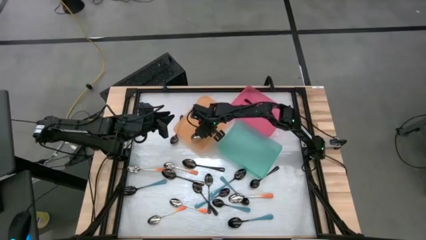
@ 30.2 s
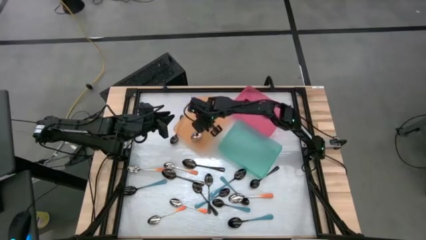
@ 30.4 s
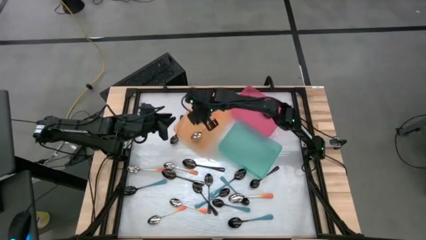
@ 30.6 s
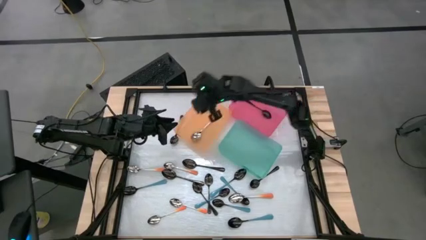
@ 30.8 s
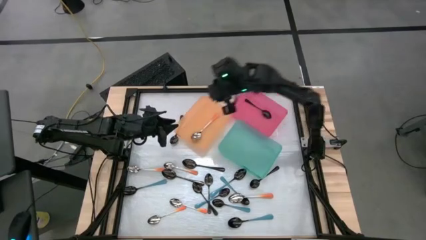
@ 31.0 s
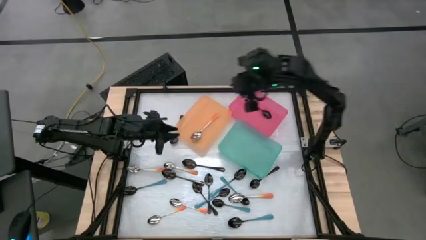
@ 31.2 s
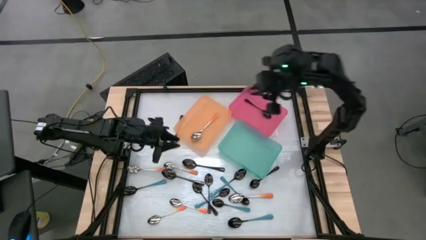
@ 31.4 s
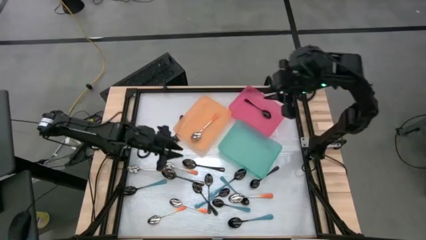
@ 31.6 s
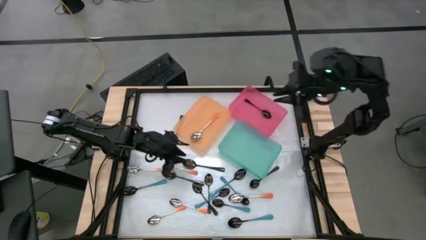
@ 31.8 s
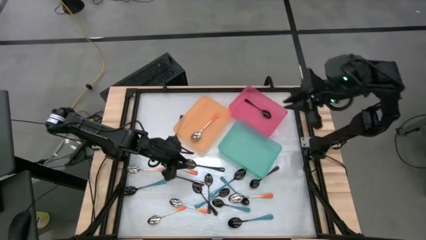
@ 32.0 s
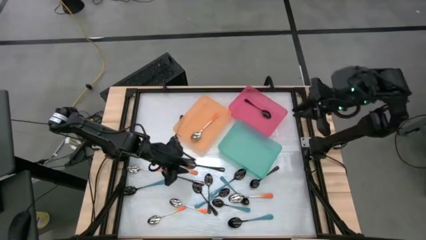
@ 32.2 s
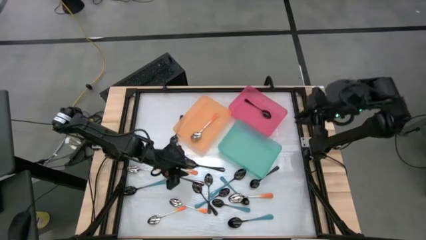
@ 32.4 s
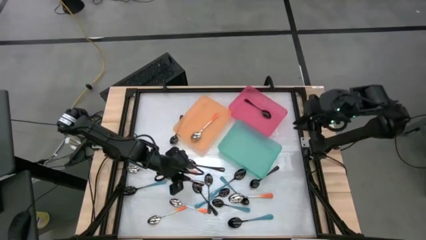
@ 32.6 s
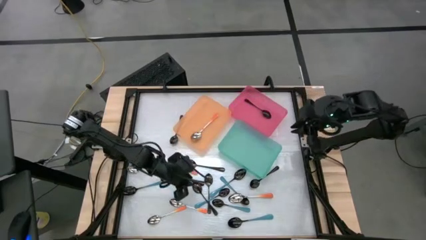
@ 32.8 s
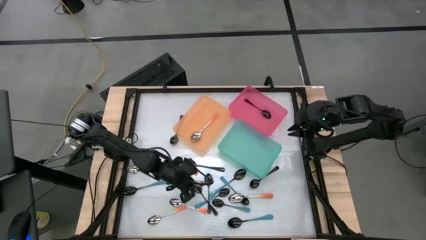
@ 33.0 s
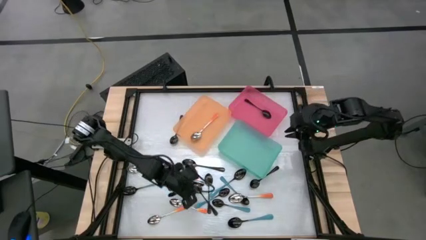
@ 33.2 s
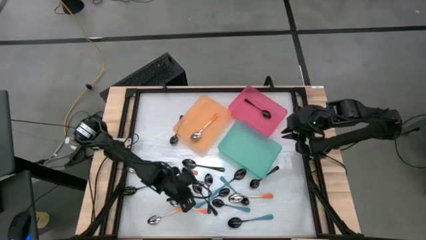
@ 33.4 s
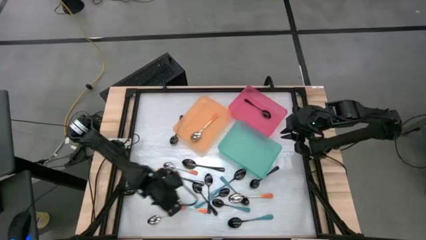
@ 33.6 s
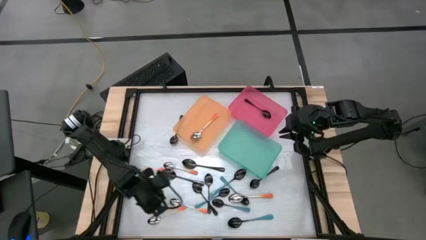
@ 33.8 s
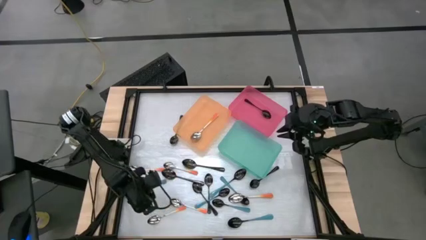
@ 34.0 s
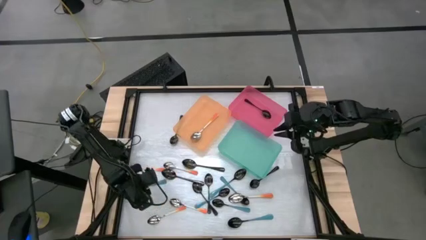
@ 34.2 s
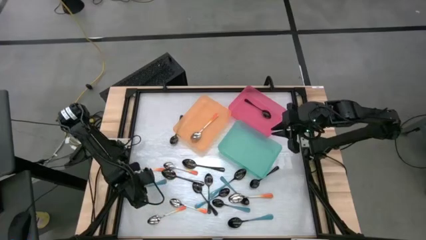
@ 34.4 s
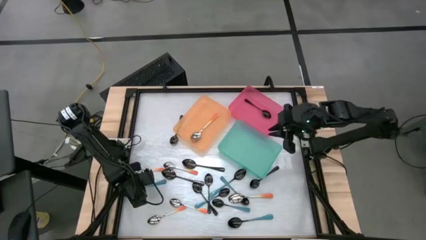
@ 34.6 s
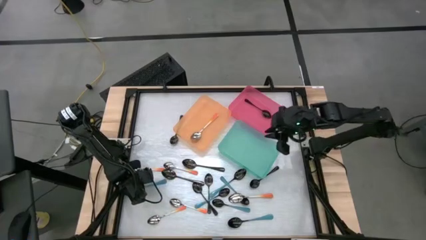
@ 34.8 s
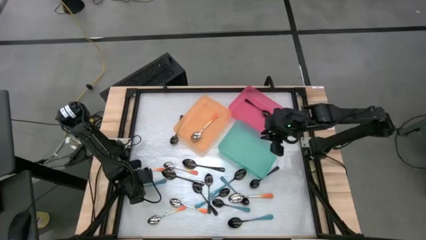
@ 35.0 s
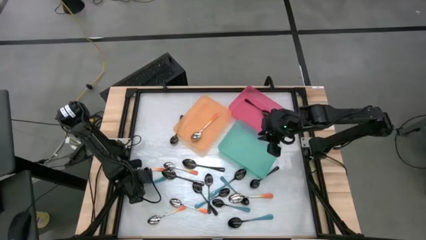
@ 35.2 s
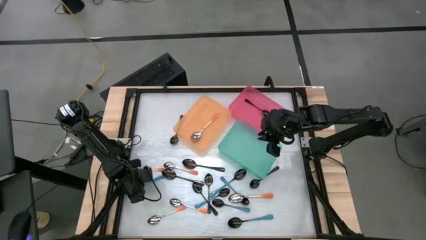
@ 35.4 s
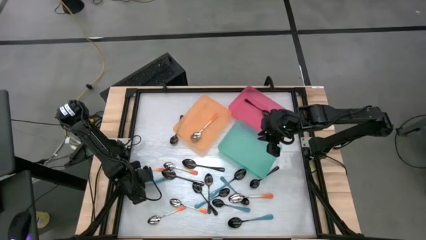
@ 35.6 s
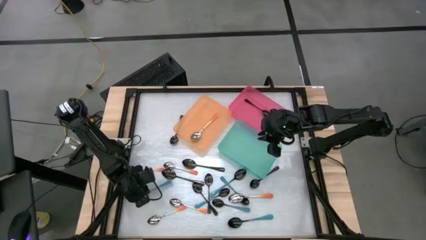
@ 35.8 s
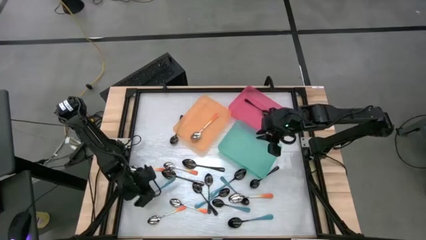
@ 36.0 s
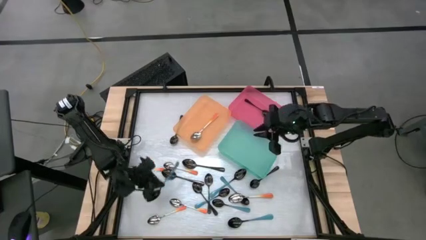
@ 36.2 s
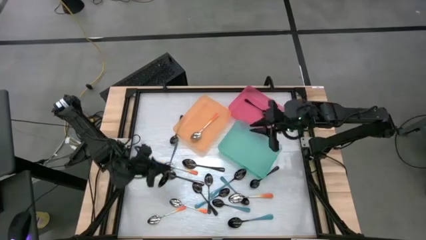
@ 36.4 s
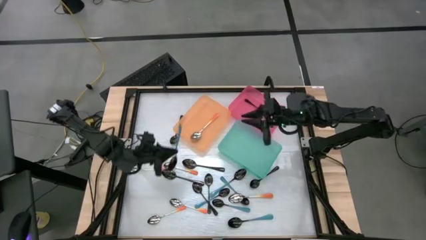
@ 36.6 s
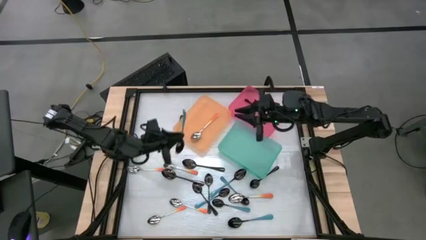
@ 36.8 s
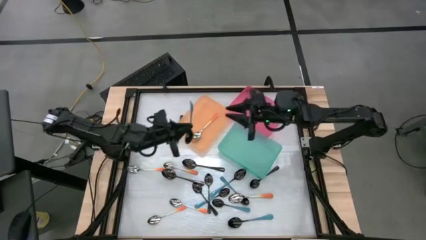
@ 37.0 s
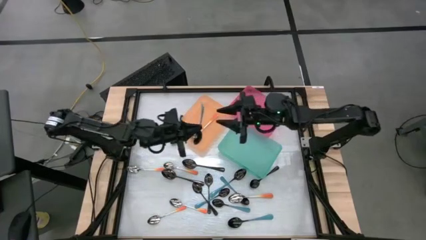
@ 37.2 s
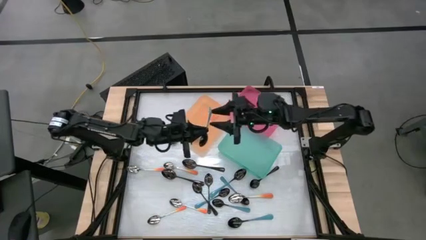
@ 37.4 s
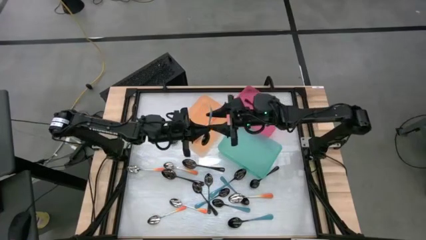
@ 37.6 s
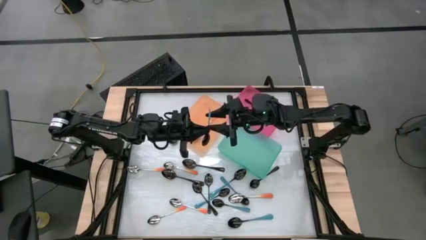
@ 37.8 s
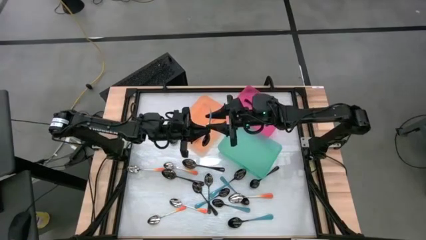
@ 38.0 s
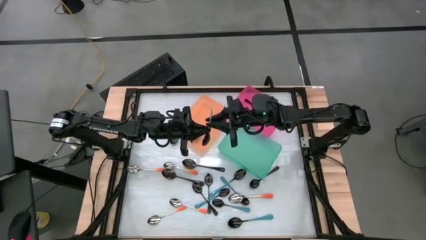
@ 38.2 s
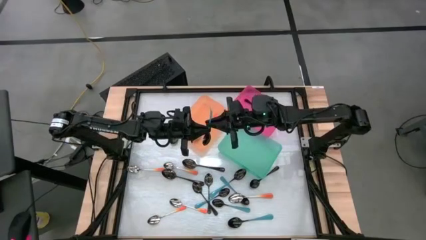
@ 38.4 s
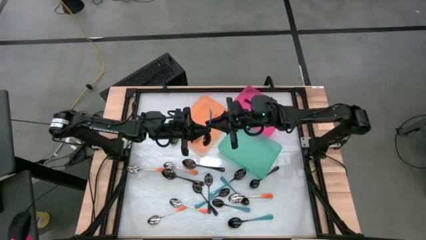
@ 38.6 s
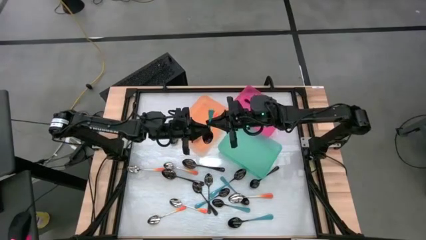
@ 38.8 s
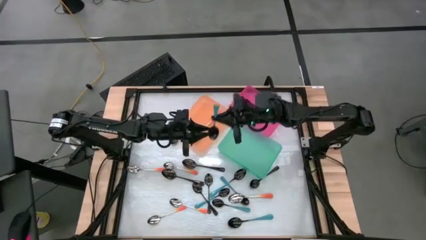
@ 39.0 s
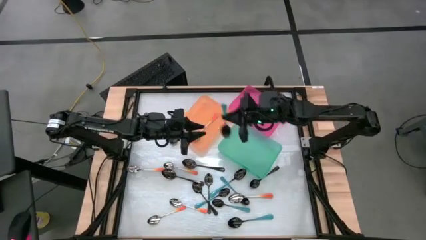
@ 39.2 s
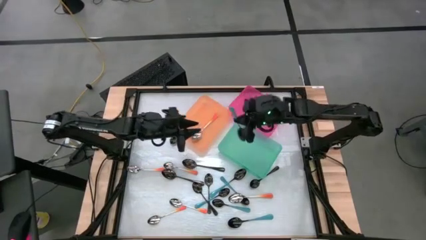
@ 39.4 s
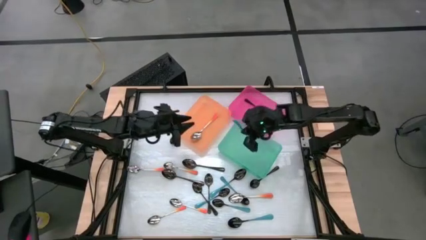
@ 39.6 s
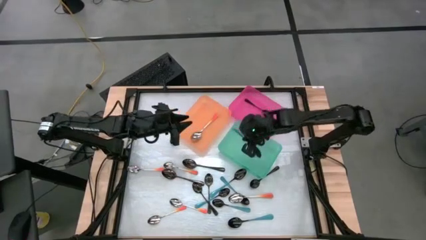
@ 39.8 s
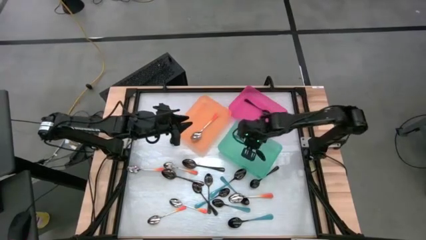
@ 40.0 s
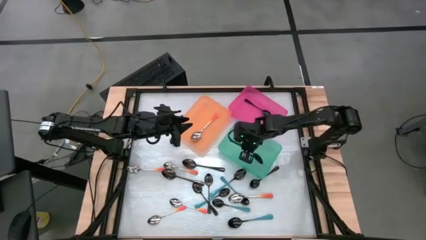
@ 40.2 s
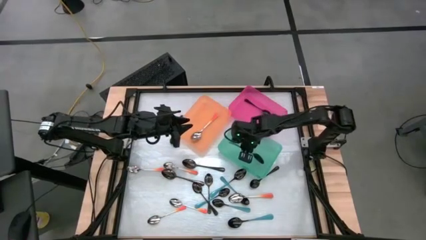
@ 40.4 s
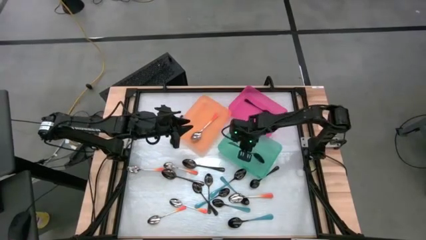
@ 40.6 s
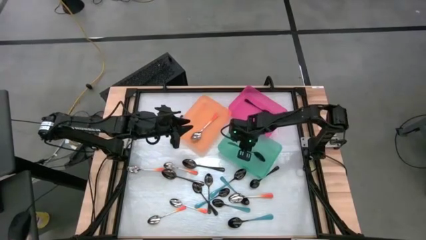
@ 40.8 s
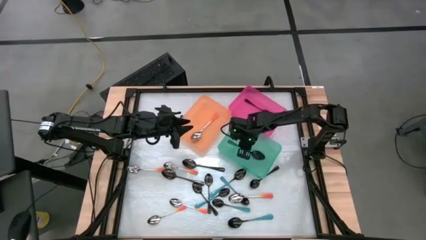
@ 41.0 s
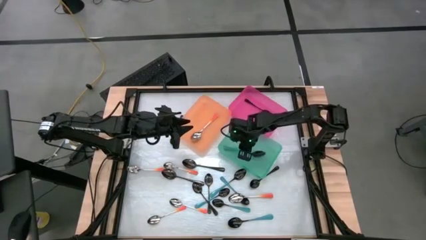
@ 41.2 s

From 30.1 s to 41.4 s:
Task: Sort silverware by color (type)
Put the blue spoon into the blue bin

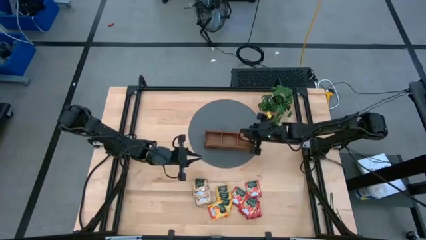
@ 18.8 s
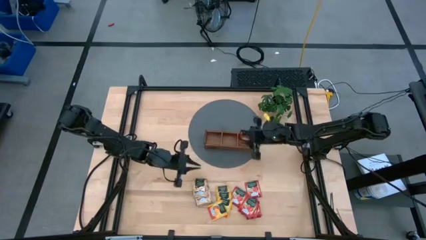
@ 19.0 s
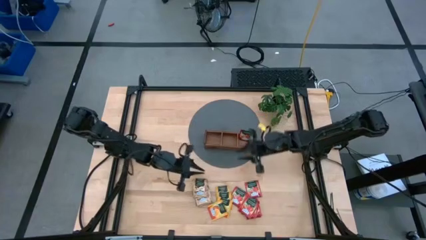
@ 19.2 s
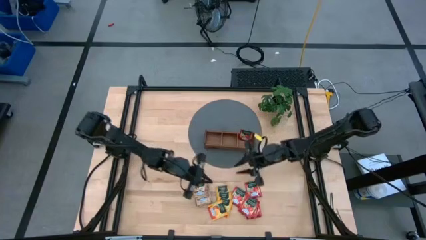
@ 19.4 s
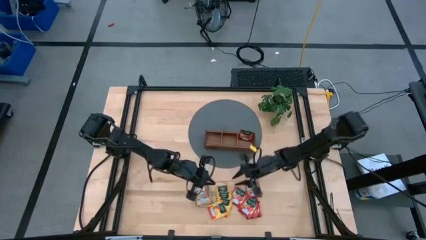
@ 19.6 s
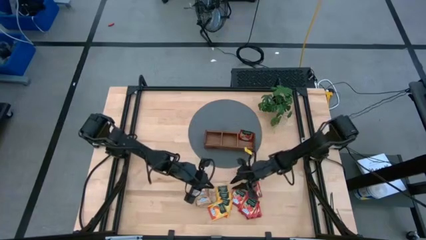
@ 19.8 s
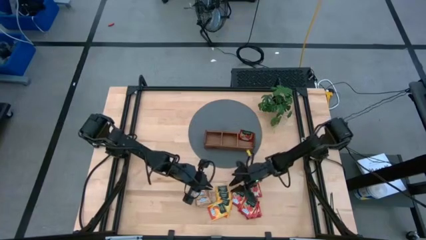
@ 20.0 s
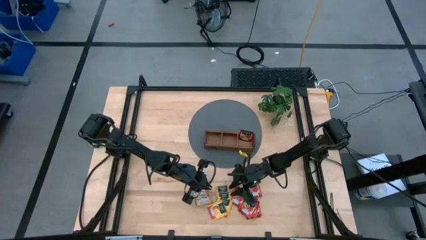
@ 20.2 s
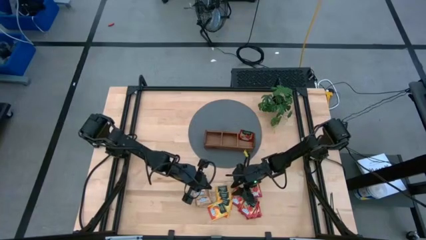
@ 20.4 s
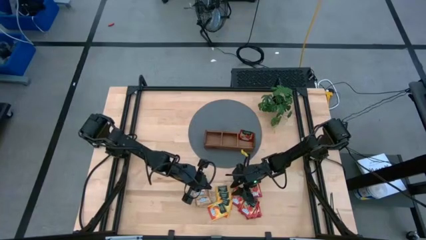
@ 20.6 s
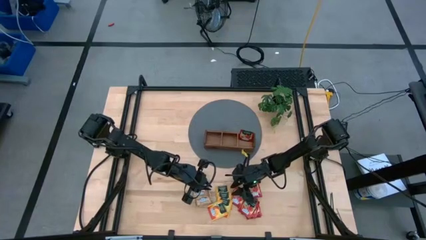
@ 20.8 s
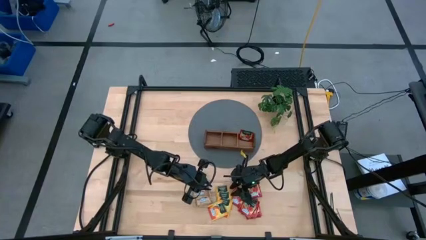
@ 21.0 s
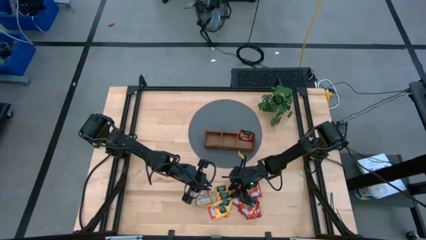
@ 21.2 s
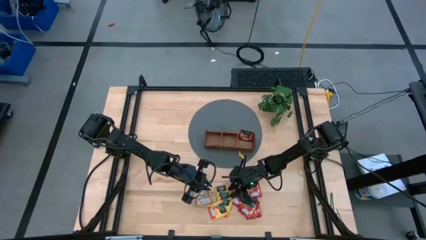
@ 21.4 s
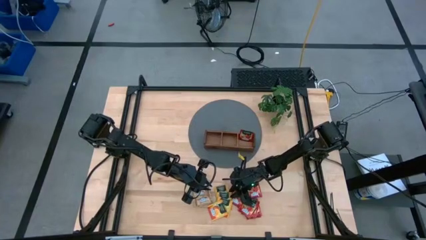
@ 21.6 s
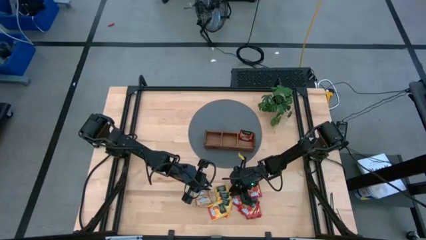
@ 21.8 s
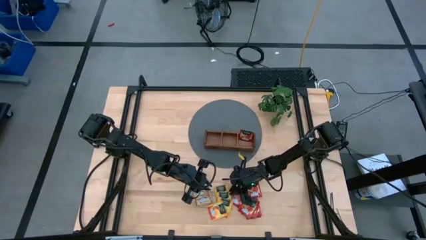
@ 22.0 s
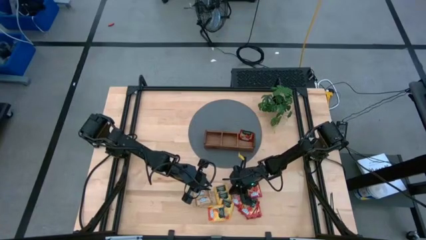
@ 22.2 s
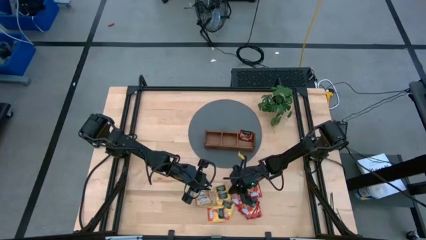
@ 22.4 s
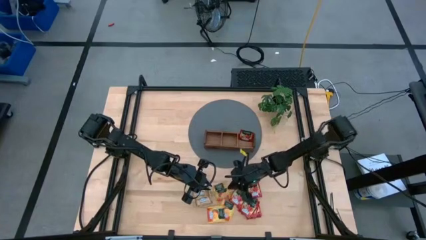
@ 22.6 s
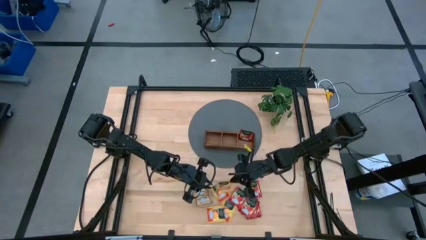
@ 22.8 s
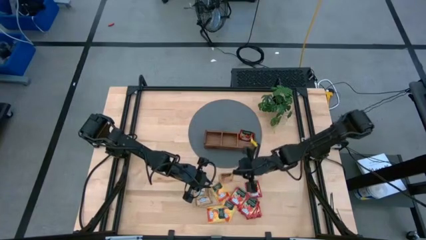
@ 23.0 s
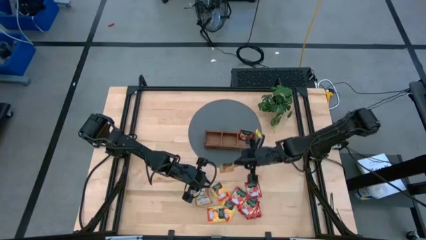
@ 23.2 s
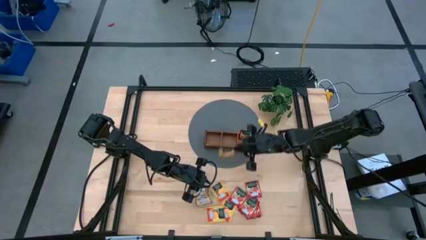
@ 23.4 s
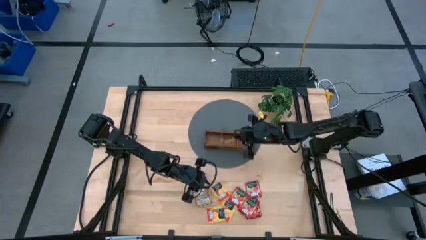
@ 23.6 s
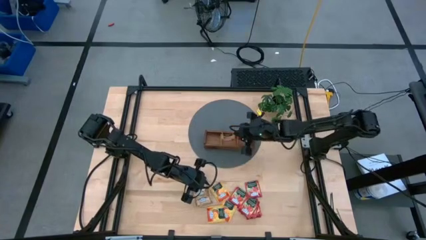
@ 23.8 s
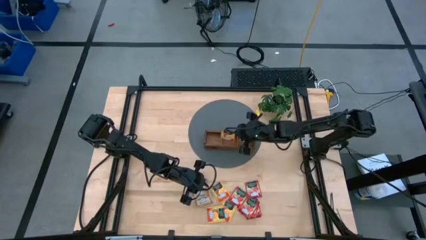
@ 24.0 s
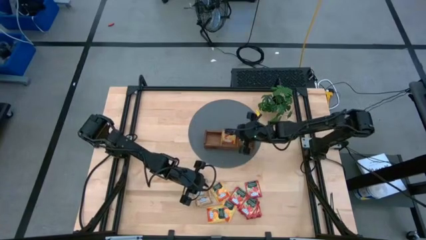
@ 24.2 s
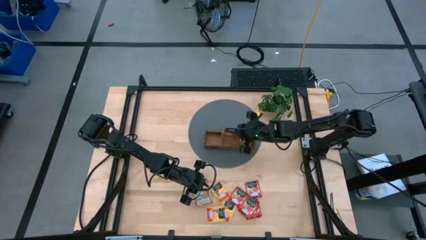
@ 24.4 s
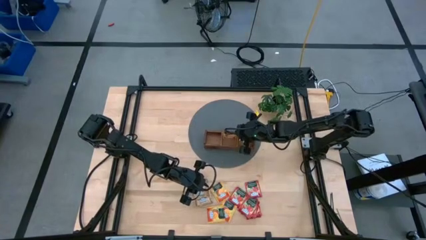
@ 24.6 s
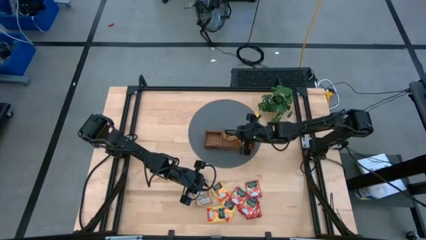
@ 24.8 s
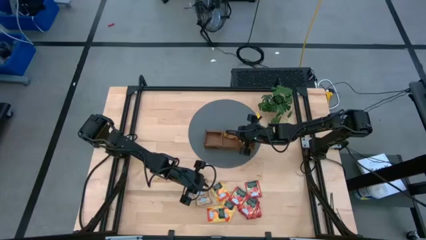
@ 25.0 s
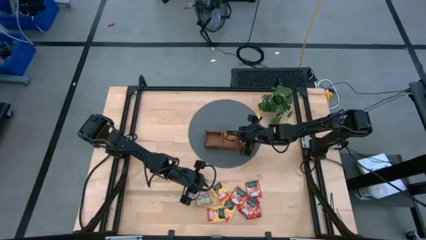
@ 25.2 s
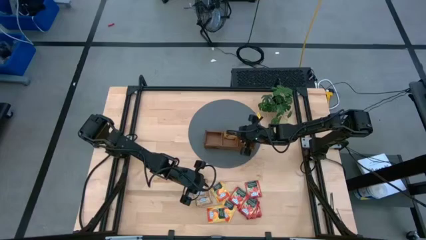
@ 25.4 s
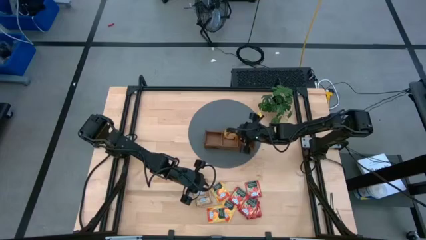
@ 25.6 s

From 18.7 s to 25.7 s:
Task: Pick & Place Tea
Put the orange tea packet into the middle section of the wooden organizer
